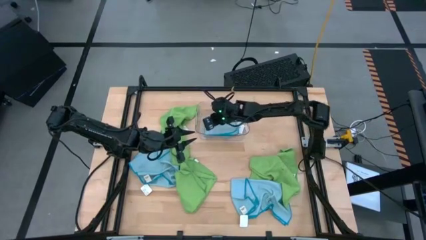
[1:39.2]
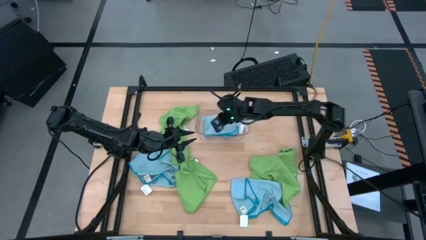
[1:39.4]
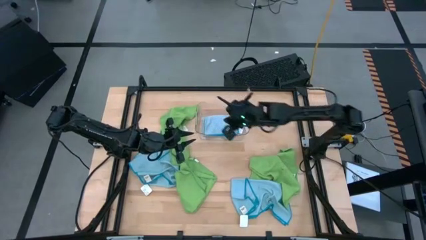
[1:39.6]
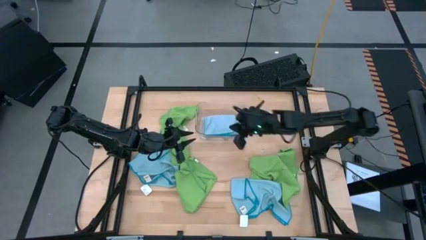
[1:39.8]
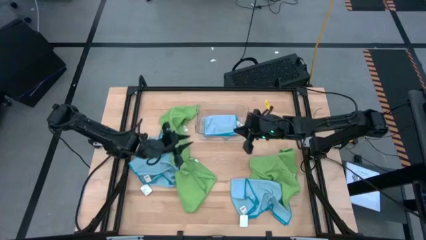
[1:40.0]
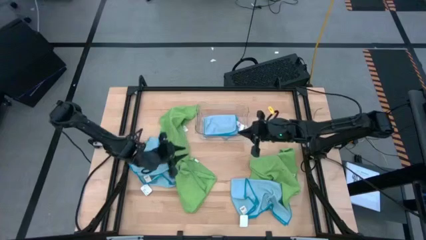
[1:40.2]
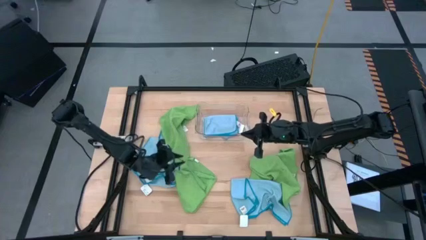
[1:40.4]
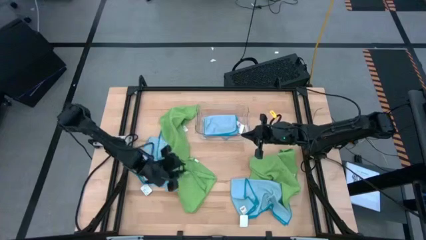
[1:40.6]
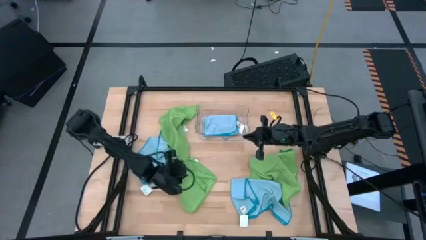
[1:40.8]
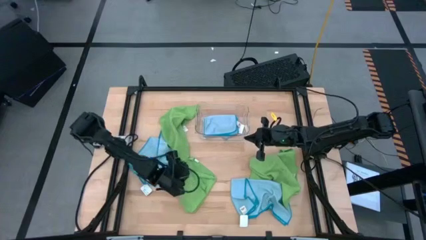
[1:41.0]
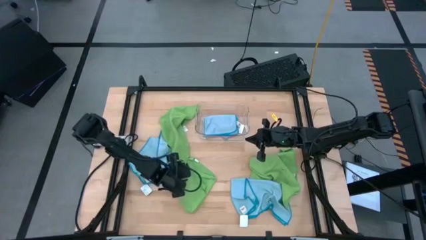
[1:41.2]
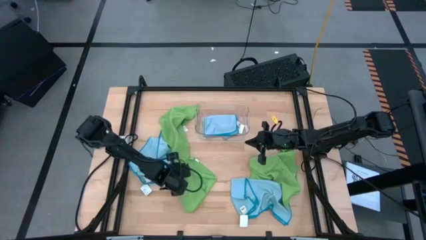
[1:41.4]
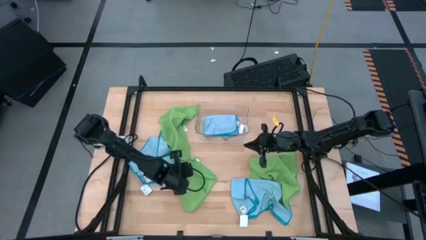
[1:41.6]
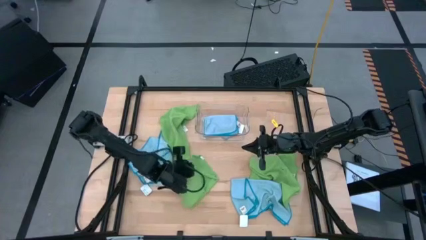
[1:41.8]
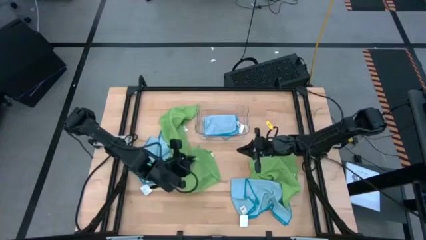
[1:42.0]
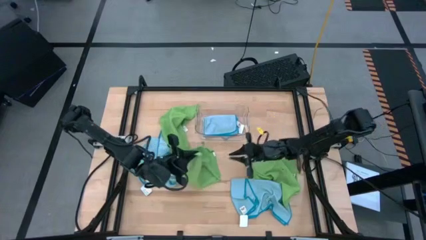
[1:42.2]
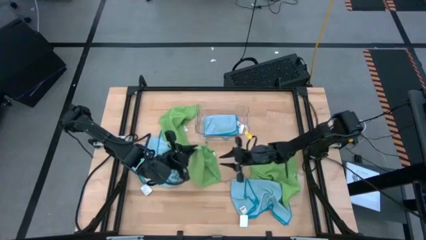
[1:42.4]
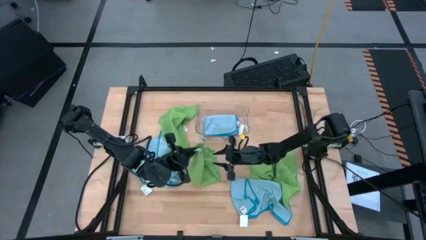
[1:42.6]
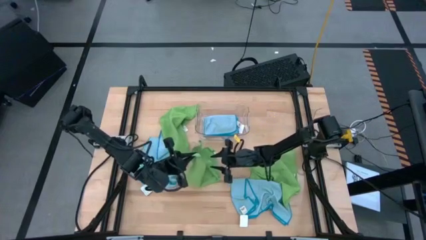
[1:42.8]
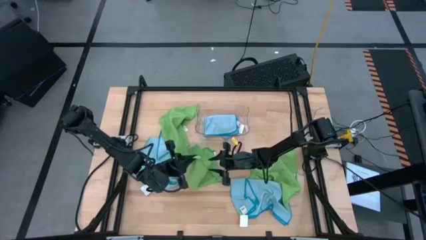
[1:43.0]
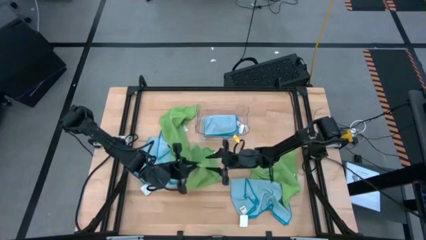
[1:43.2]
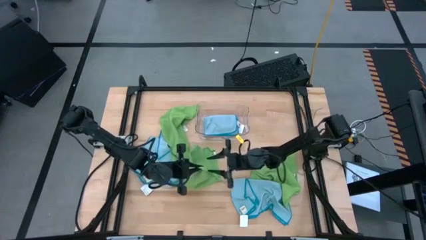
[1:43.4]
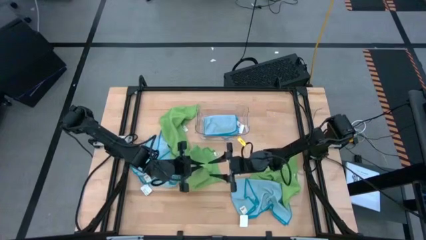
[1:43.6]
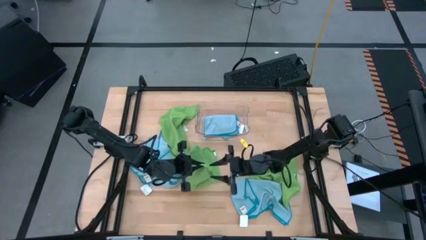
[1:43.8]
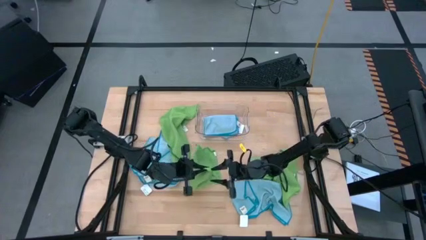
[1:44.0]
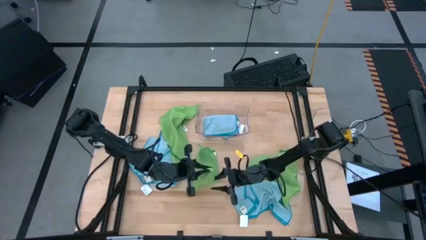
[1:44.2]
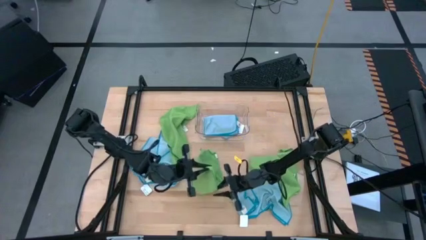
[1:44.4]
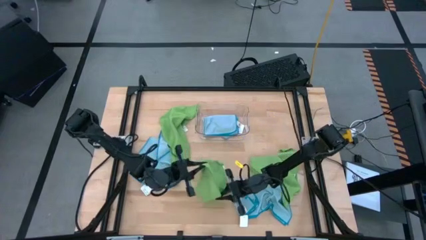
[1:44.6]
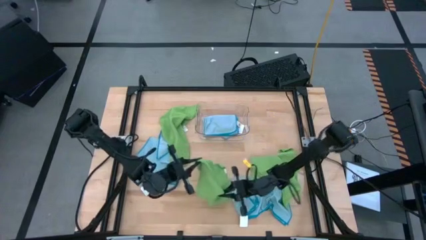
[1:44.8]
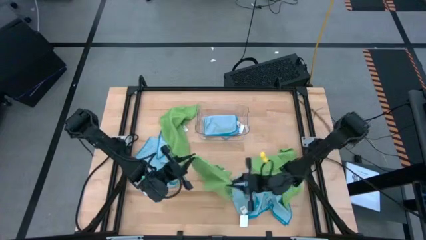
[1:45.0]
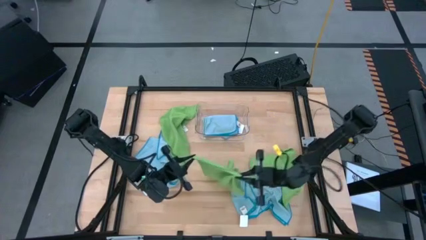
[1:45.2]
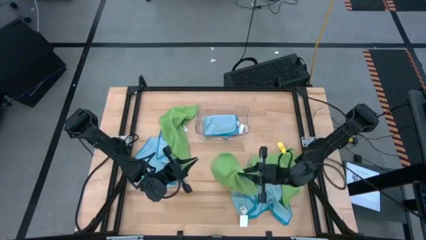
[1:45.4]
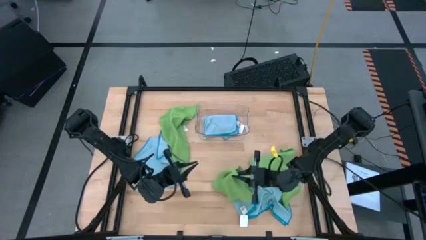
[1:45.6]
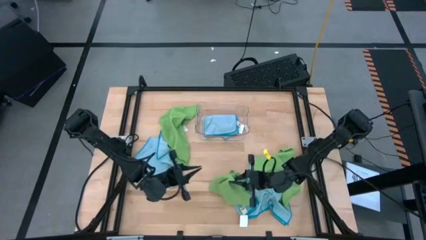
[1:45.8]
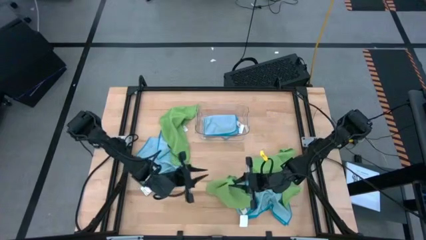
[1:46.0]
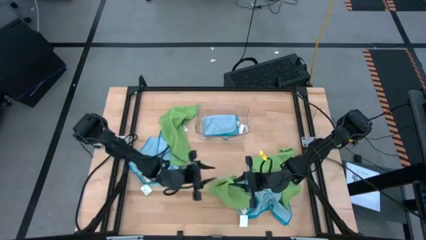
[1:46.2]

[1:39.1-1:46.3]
Task: Fold microfiber towels
Fold the bottom left green microfiber cloth

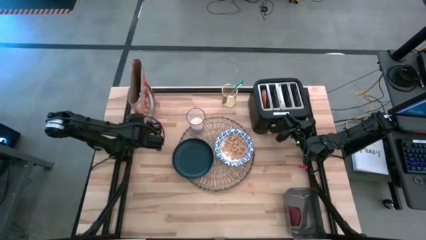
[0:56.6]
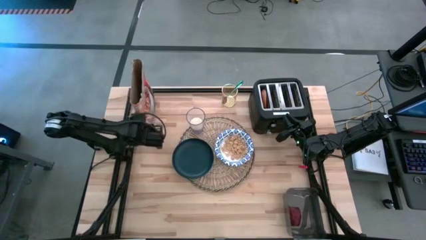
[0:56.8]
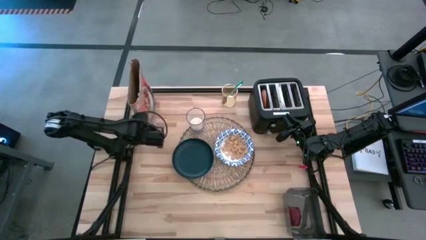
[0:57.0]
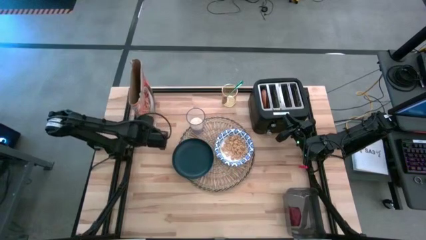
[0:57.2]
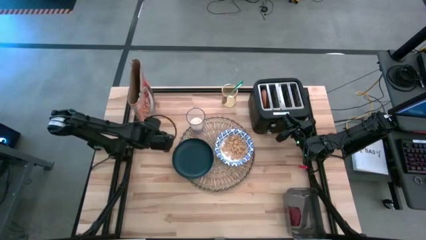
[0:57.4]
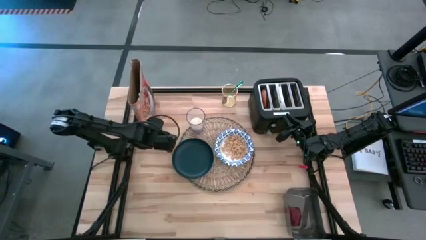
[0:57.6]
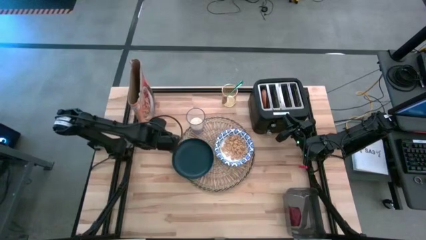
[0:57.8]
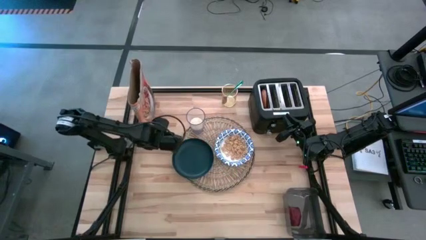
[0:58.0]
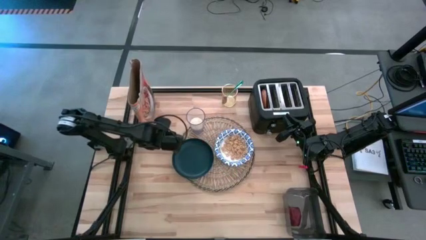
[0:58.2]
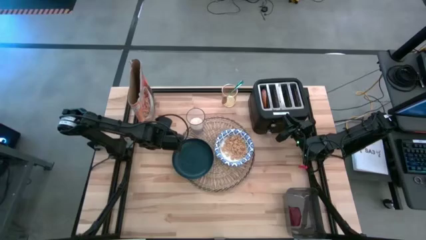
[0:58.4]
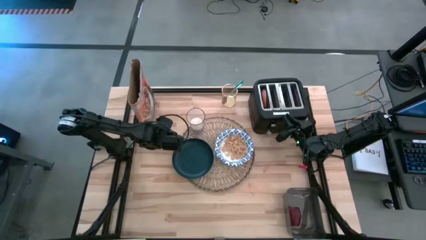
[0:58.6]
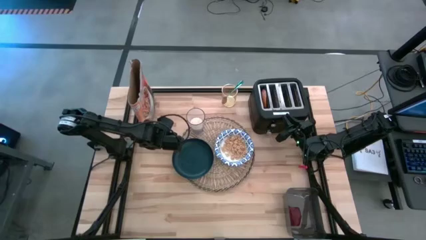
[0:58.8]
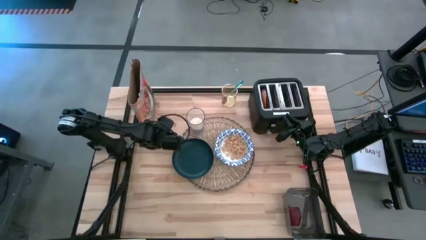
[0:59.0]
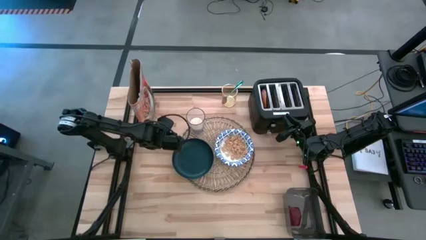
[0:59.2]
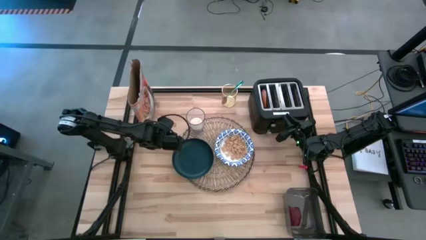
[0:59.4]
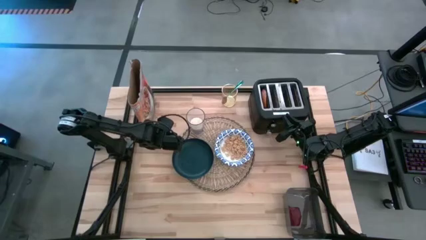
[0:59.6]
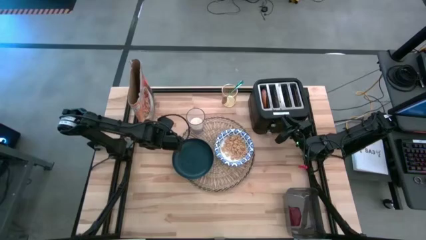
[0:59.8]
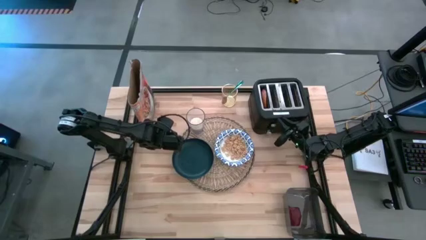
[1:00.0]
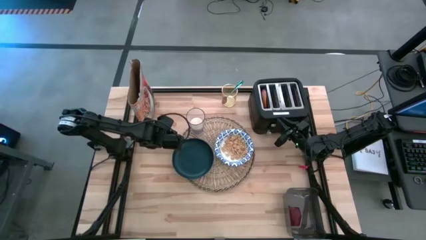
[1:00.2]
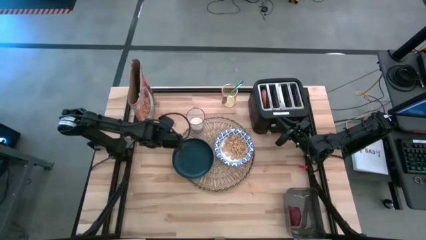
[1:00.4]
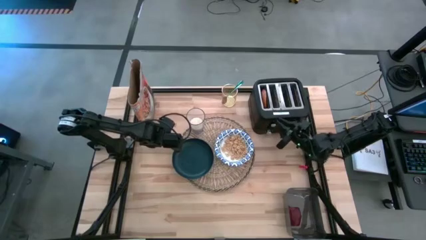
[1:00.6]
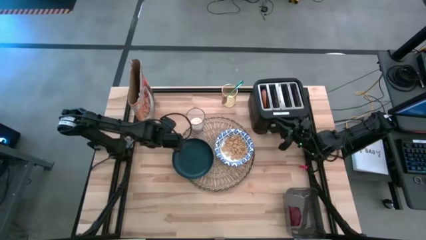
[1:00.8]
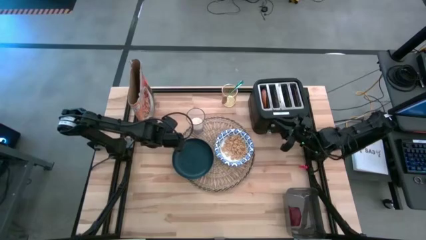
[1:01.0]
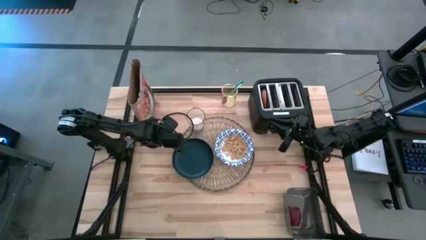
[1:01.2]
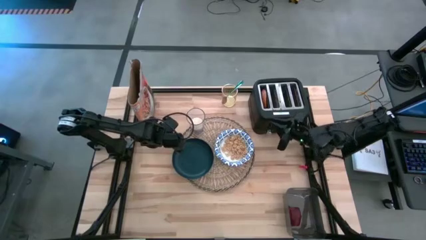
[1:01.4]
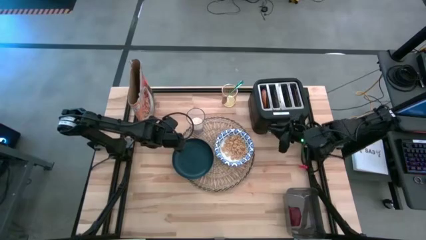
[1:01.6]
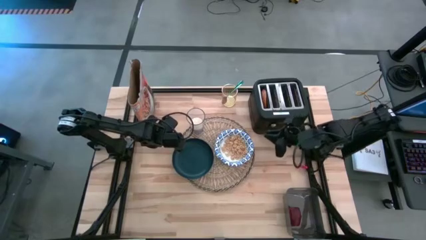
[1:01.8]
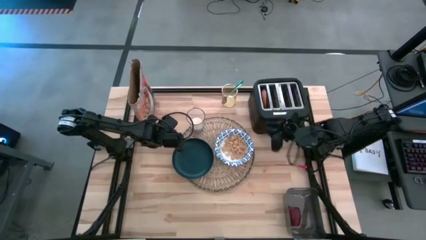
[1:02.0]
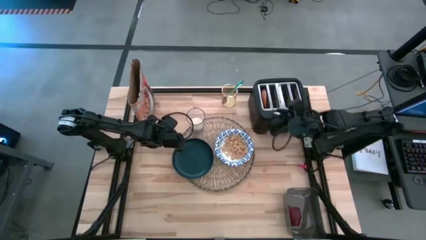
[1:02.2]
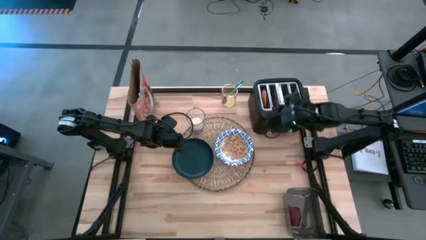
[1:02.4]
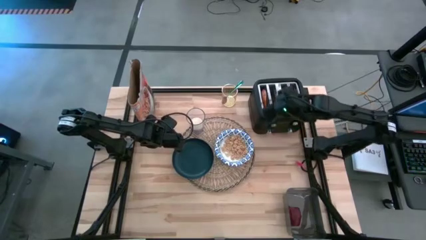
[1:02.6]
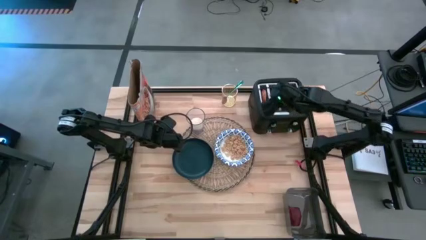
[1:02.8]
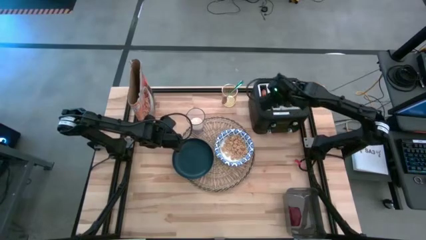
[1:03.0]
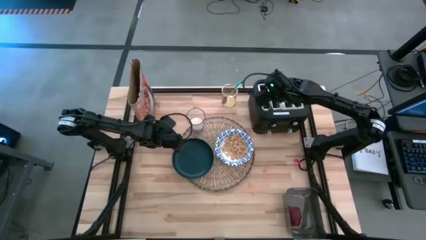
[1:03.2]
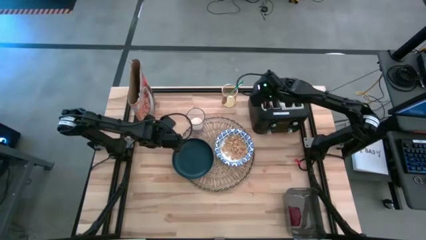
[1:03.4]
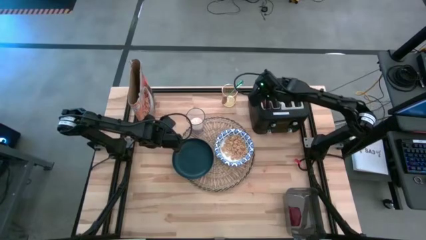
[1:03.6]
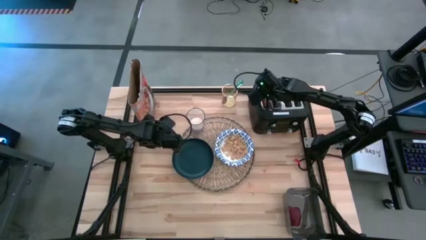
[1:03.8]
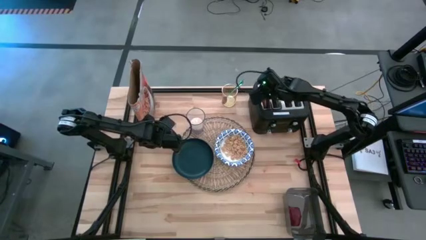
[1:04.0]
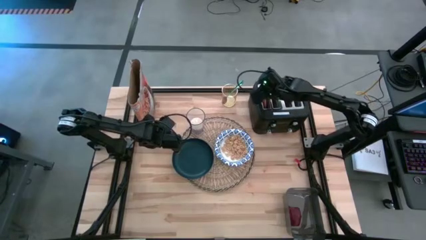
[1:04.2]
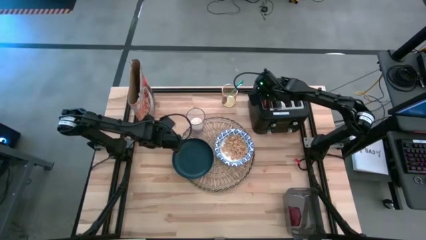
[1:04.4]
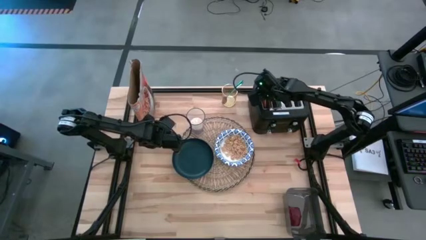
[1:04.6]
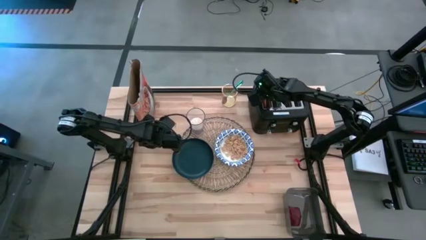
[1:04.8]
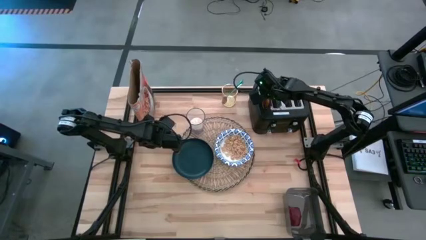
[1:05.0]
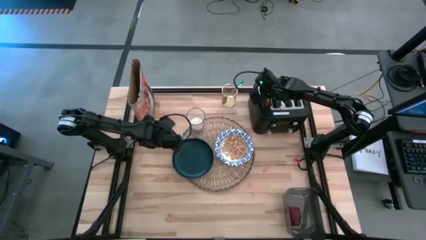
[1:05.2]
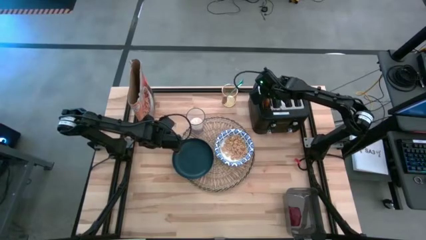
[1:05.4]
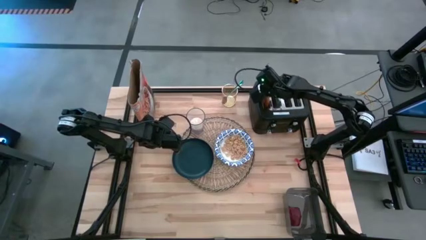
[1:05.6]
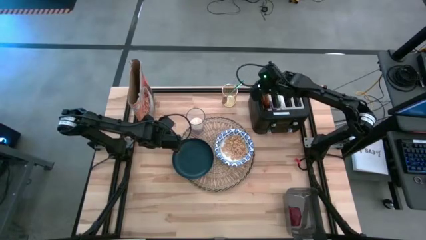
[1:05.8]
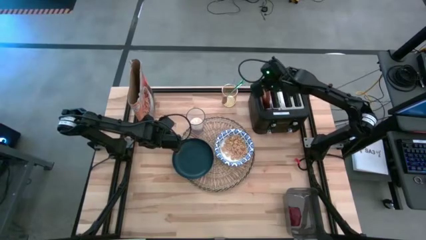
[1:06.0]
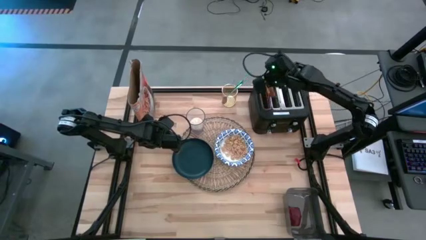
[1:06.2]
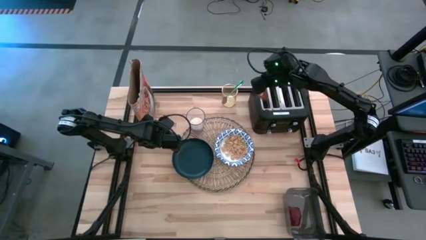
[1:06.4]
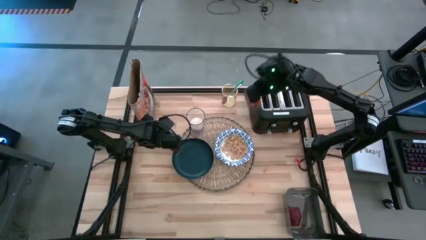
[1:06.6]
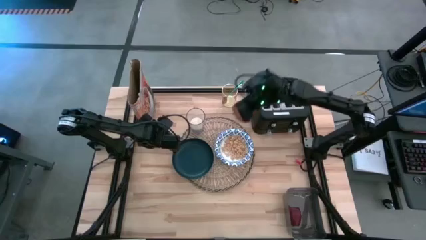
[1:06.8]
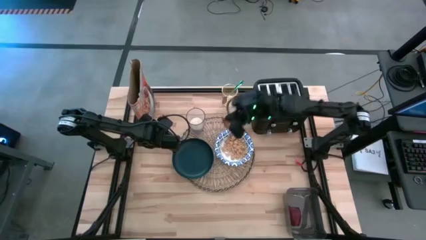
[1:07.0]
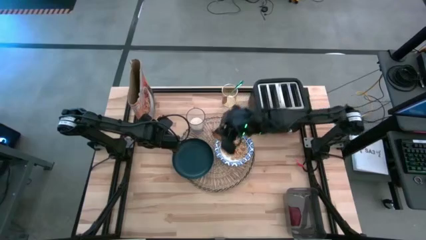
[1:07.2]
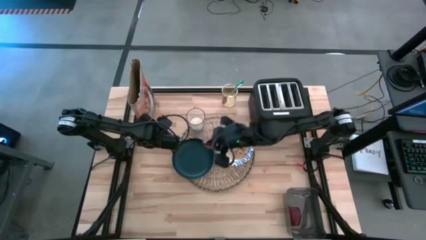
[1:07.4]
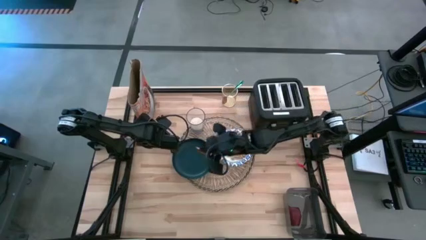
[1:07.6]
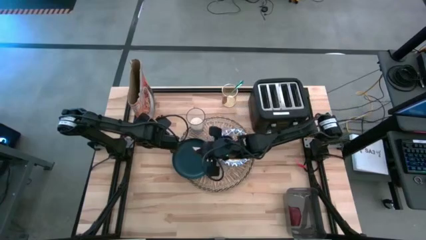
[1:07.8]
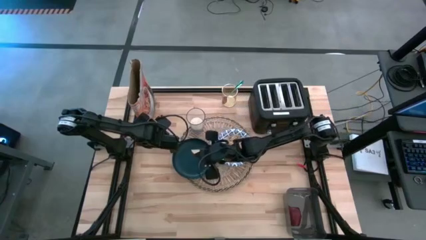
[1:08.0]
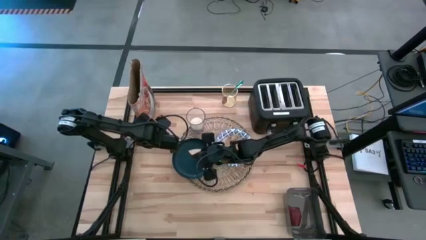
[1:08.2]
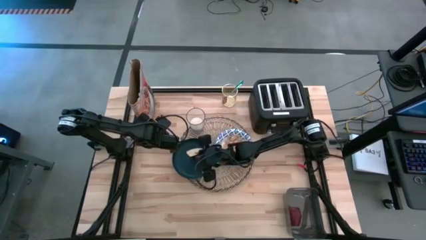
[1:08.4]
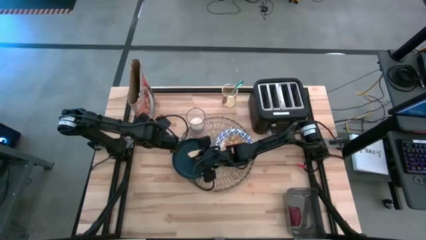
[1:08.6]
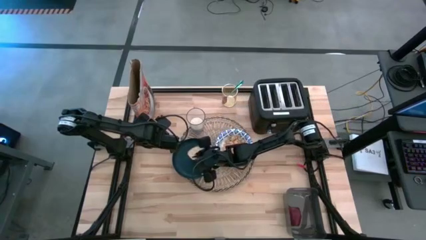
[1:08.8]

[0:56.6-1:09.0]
Task: Arrange a breakfast setting
Put the bagel from the toaster on the black plate on the brown placemat
